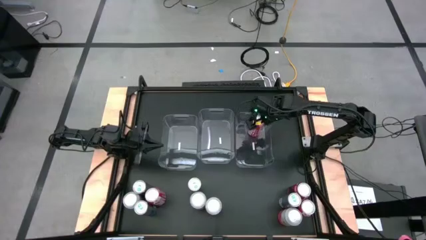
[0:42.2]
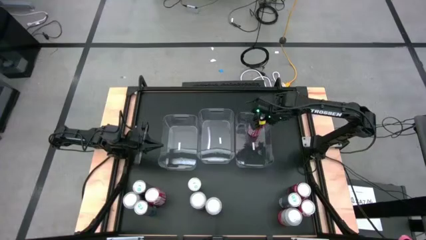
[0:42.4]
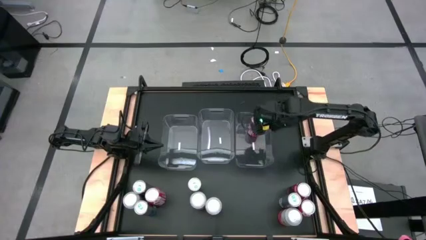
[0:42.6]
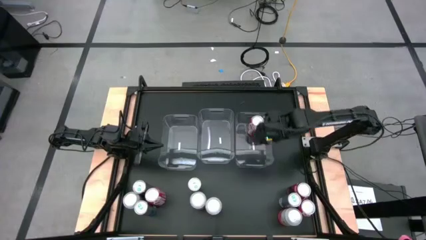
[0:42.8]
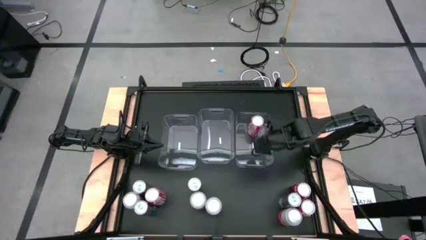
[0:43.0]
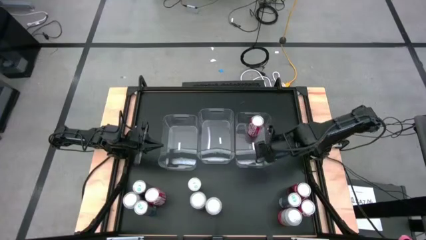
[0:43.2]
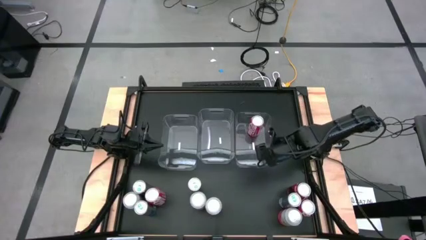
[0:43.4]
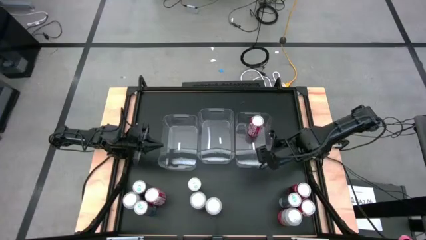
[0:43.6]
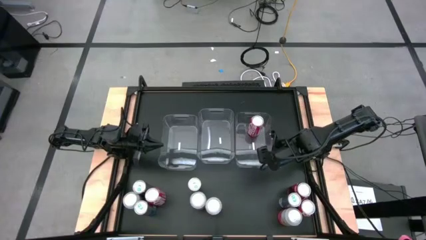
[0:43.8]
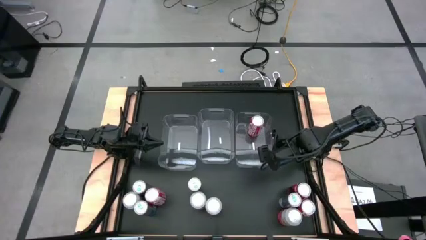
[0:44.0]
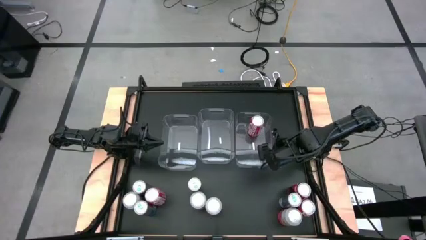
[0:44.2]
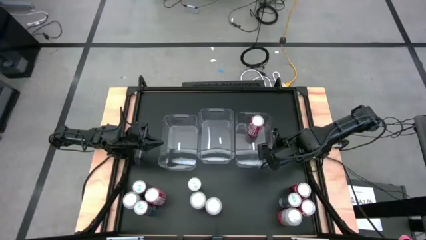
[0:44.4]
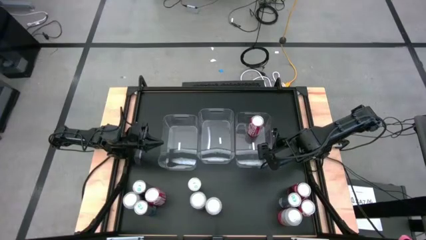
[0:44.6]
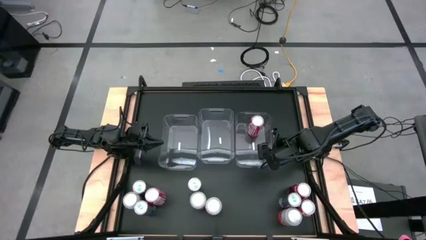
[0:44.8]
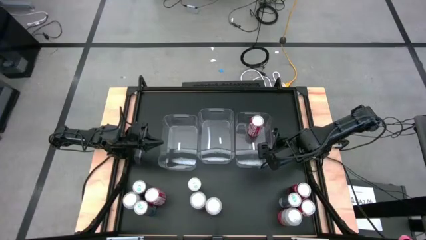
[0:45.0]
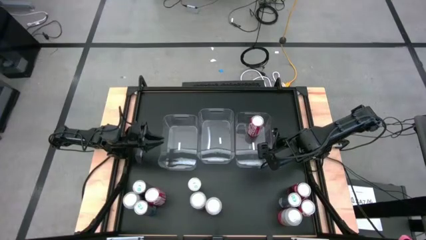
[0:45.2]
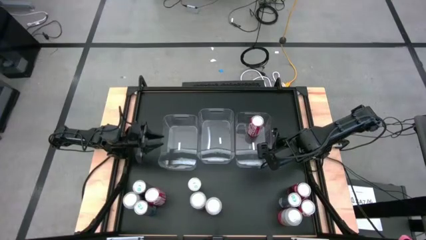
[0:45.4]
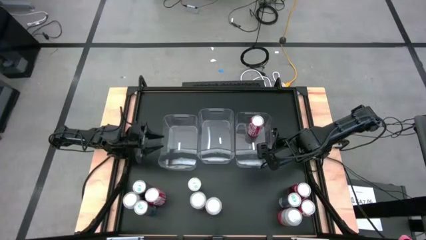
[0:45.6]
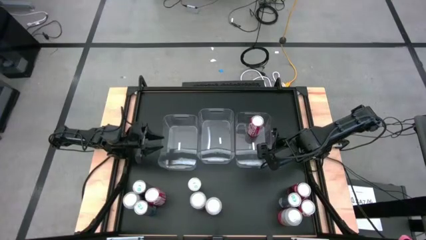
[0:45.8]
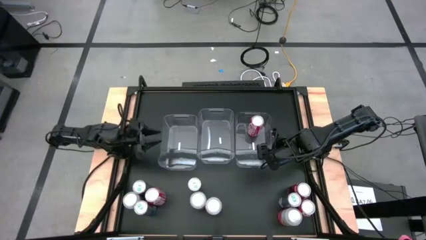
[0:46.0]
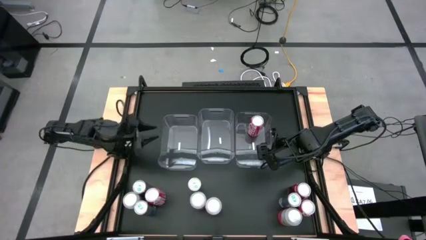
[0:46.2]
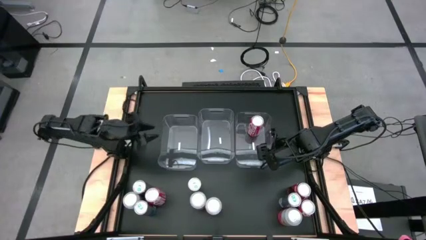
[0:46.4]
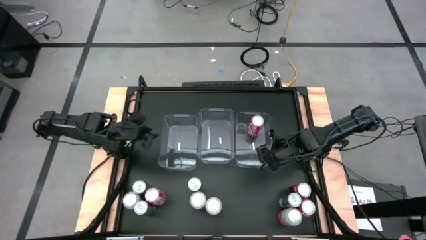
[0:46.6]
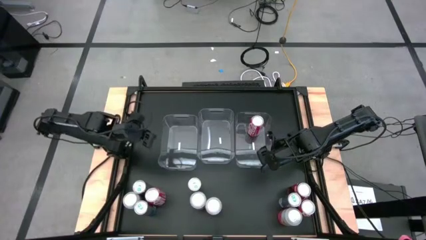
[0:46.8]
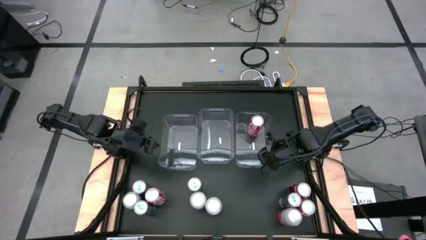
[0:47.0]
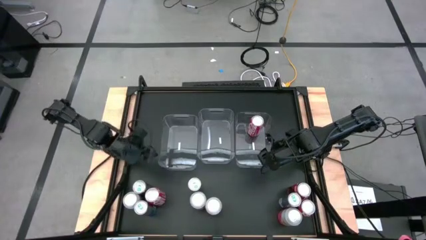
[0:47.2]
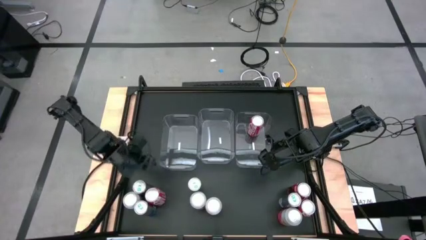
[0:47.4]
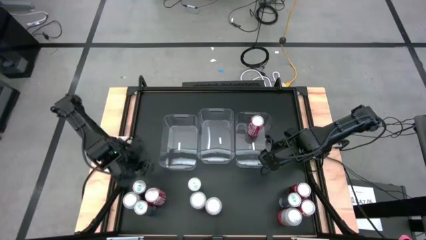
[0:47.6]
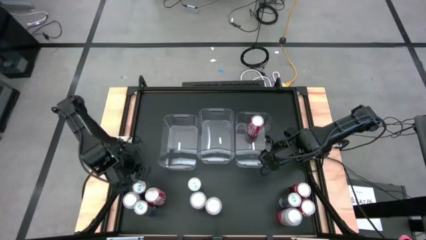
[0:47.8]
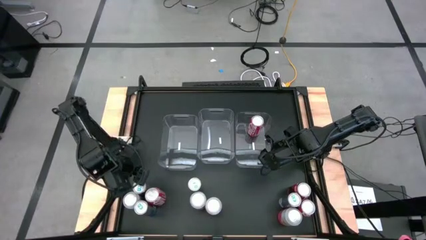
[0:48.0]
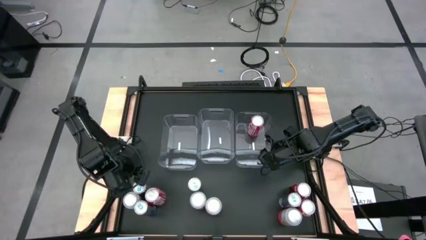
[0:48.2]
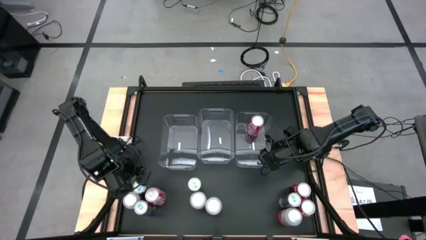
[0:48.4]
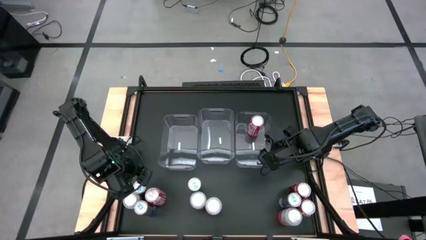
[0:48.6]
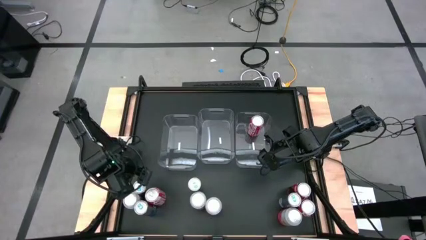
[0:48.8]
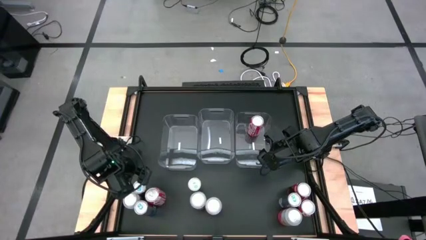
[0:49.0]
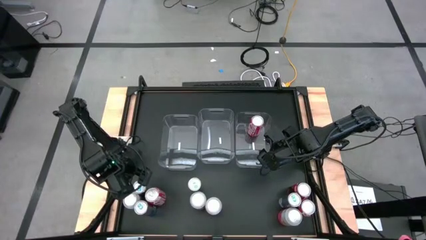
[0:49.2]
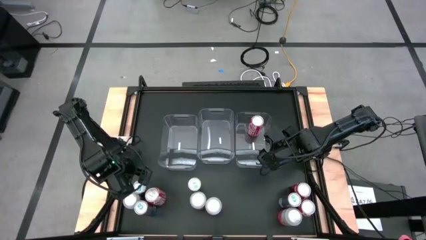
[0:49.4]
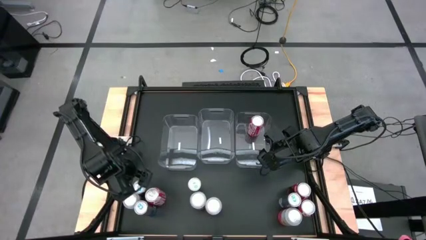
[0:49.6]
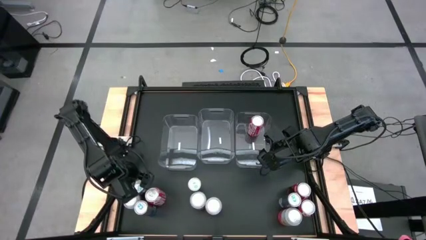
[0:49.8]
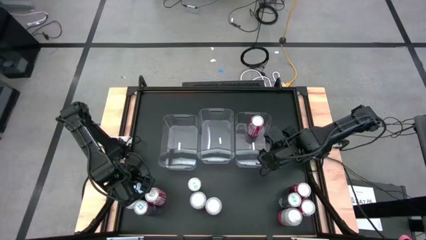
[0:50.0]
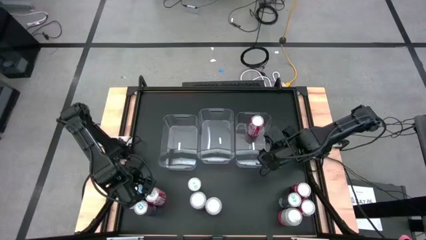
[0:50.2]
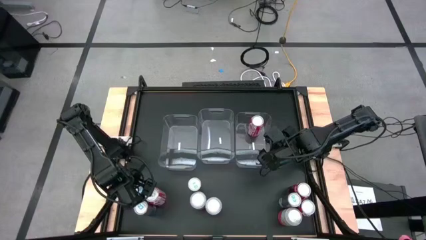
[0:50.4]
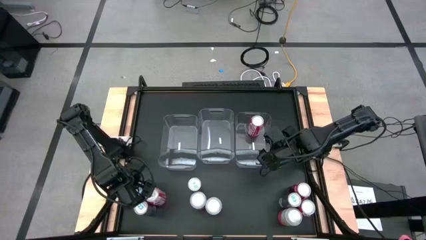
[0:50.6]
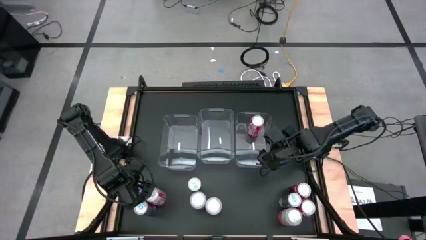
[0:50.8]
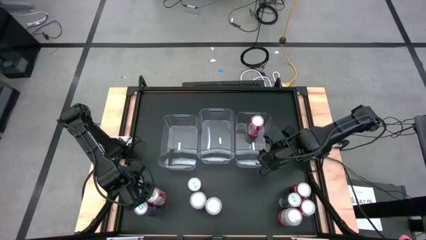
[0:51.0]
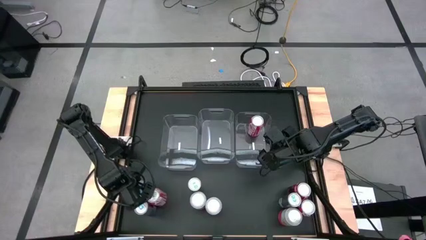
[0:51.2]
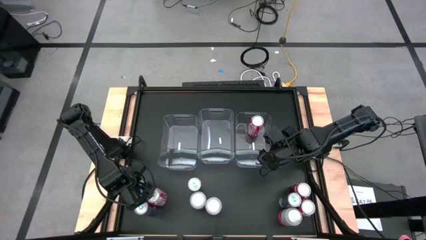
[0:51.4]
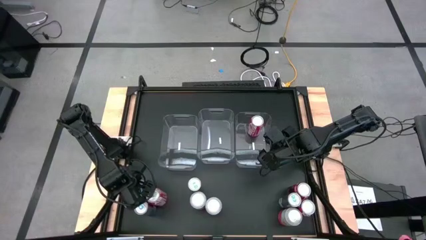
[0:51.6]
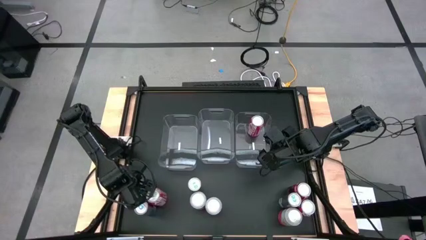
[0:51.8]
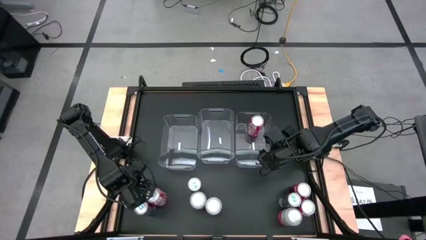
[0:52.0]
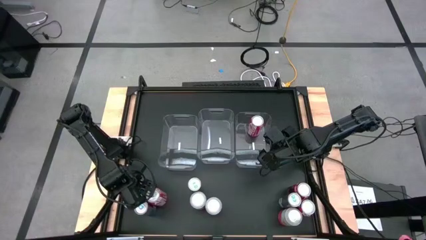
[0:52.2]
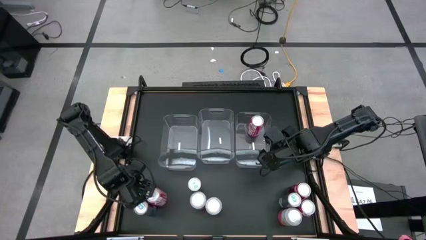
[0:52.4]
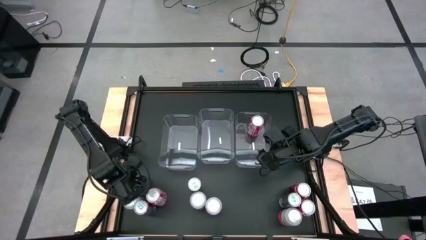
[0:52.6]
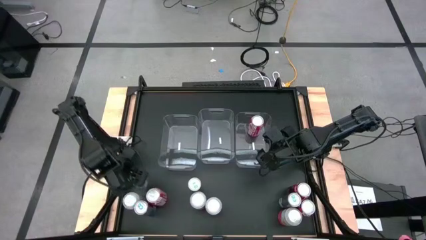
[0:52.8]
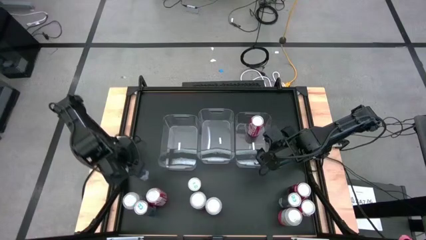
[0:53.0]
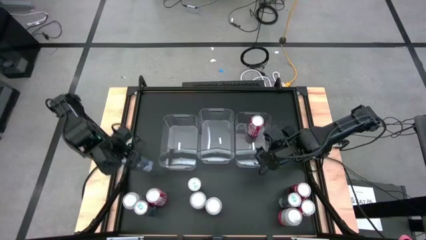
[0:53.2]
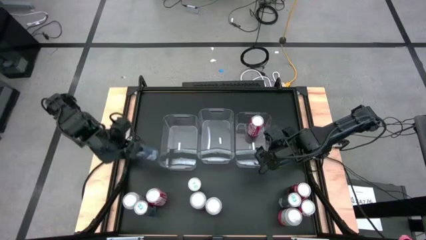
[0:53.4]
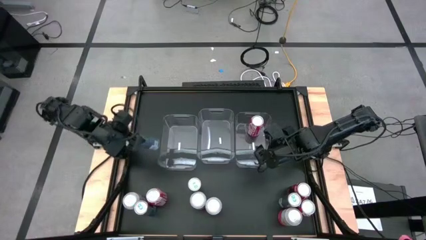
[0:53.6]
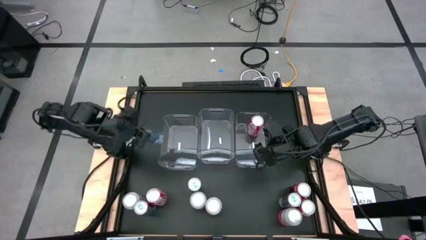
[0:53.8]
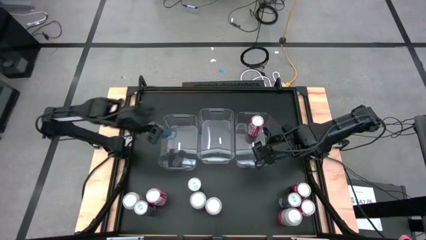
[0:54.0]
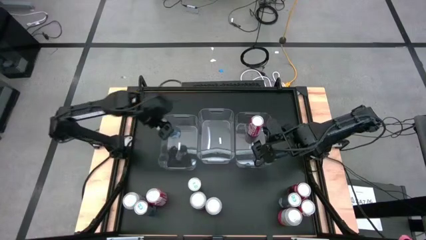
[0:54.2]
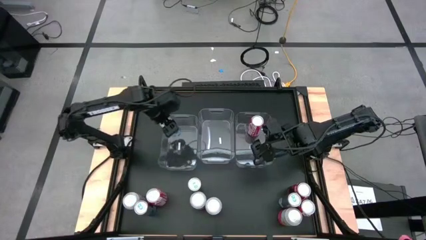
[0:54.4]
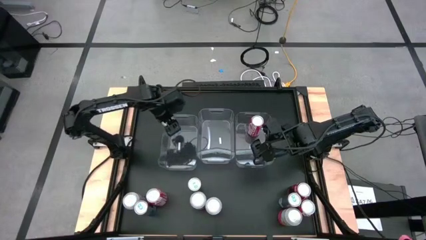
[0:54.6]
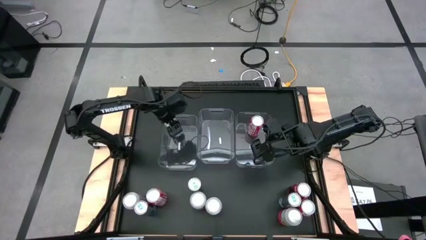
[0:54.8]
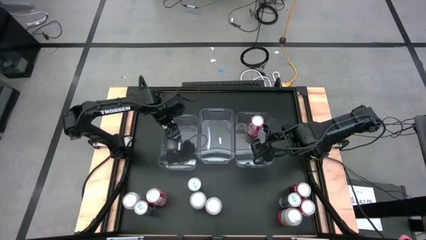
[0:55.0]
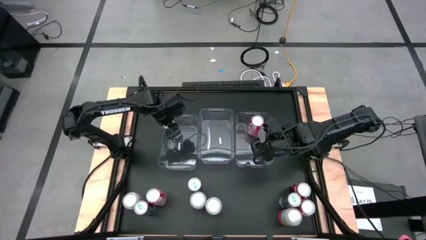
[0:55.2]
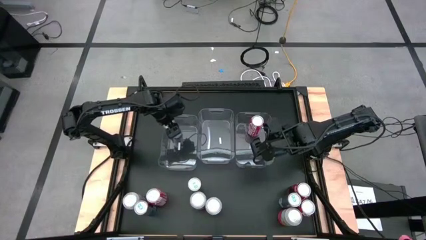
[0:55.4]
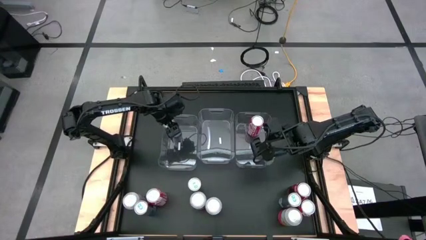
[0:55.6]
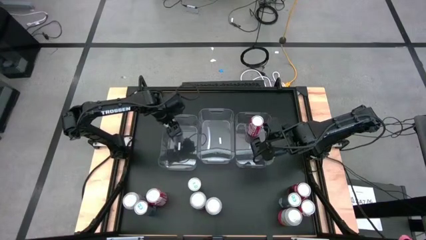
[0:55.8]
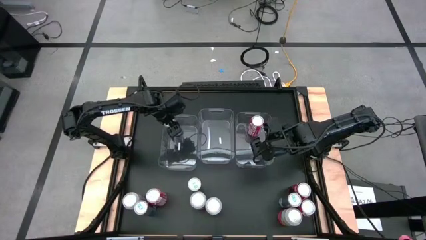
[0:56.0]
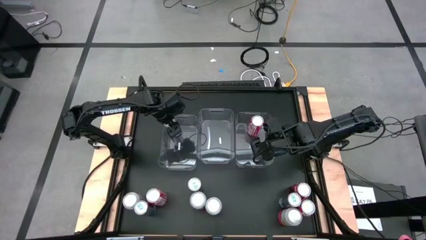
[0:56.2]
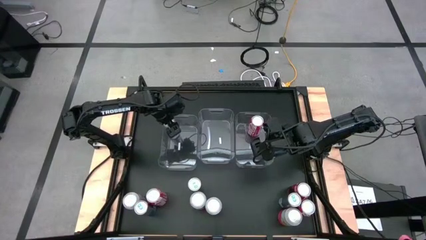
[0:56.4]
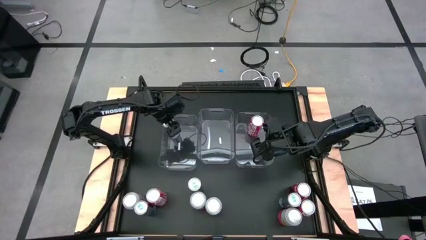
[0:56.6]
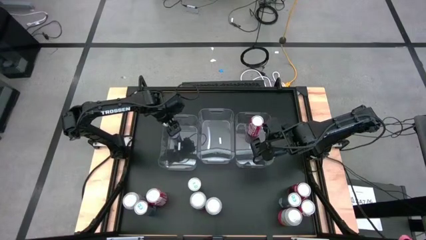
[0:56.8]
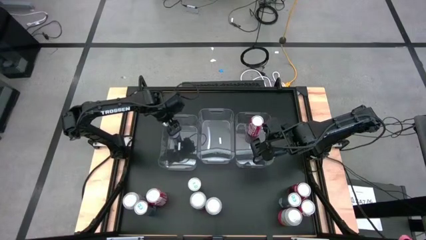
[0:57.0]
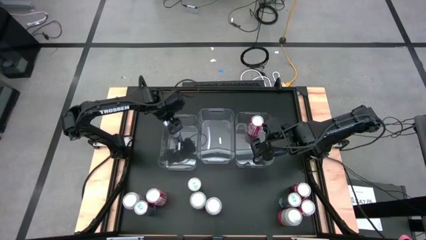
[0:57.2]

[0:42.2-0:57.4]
Task: Sort soda cans
Put the bottom left blue soda can into the left transparent bin
